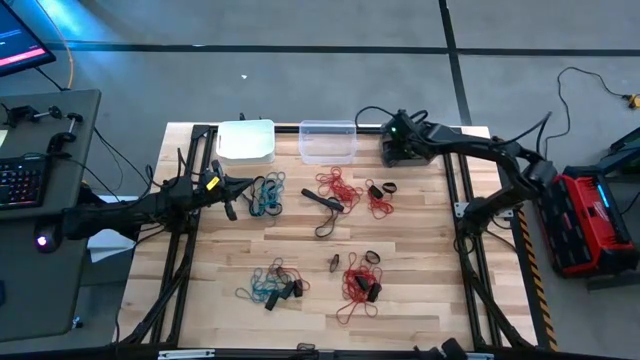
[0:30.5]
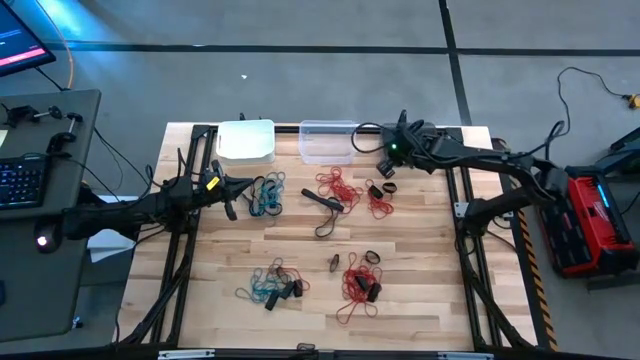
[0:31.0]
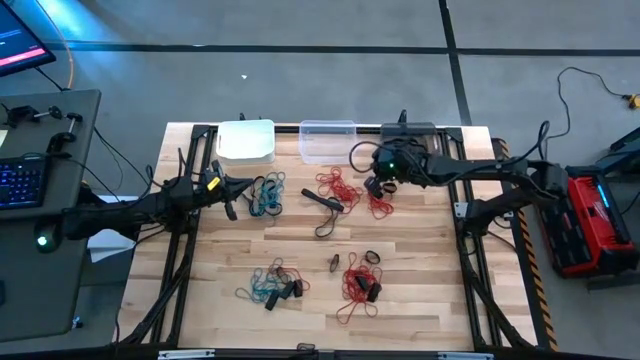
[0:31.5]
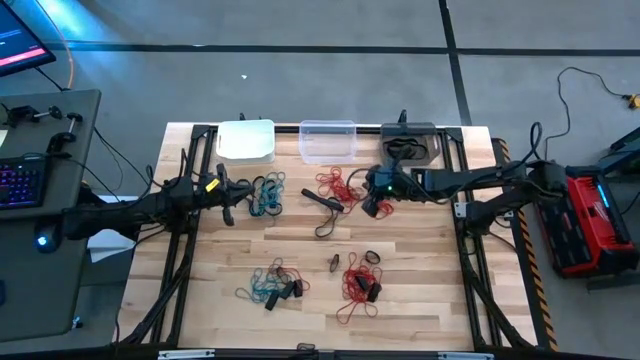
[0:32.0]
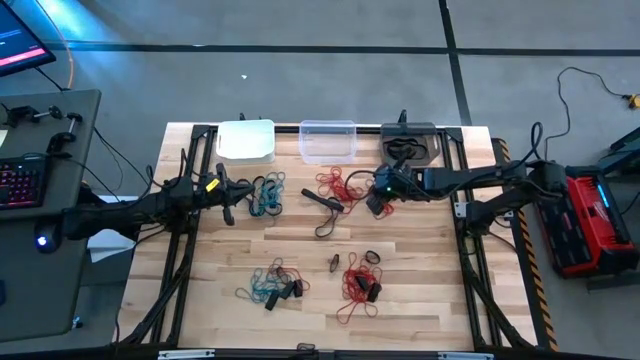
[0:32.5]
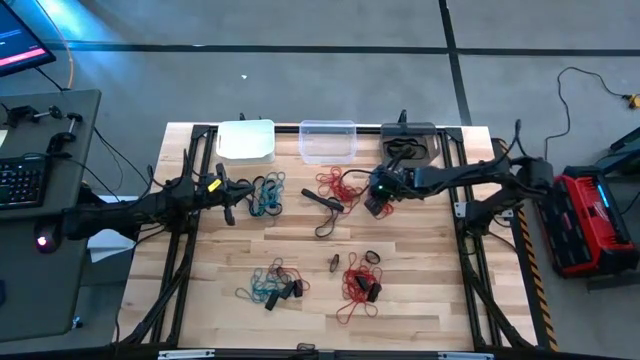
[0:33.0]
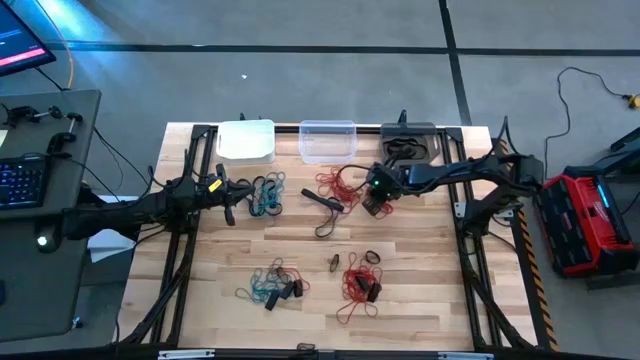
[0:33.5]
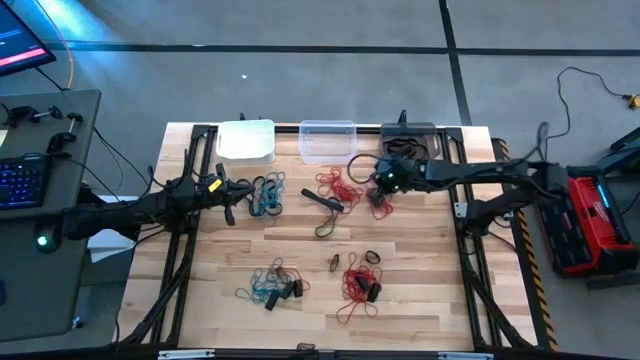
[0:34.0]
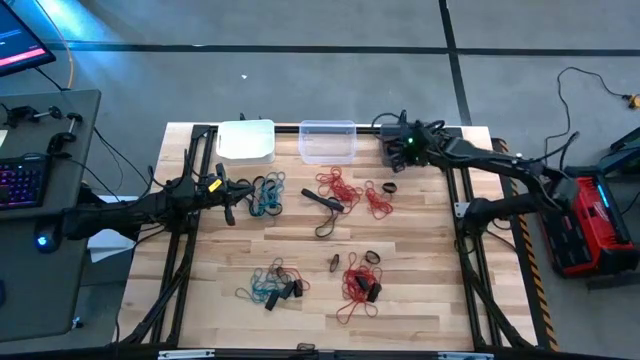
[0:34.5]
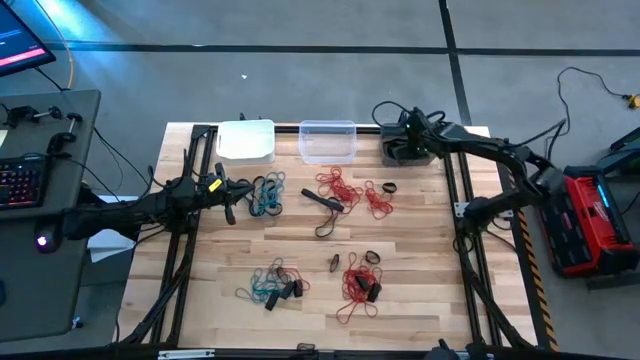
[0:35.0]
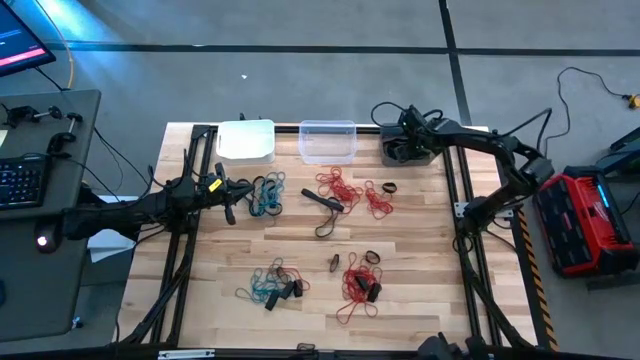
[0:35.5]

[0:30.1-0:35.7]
Task: Sort rubber bands into baskets
Put the black rubber band into the black bin

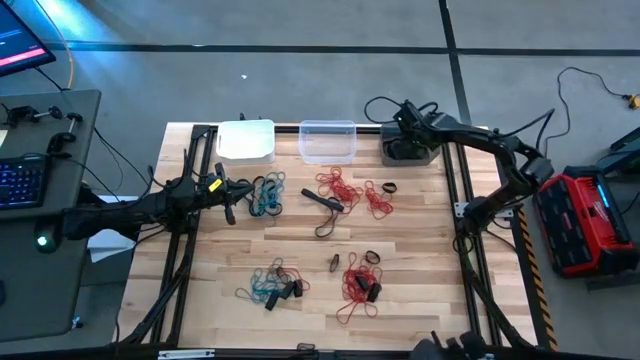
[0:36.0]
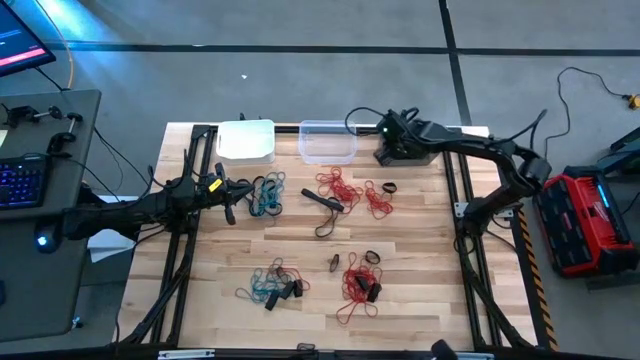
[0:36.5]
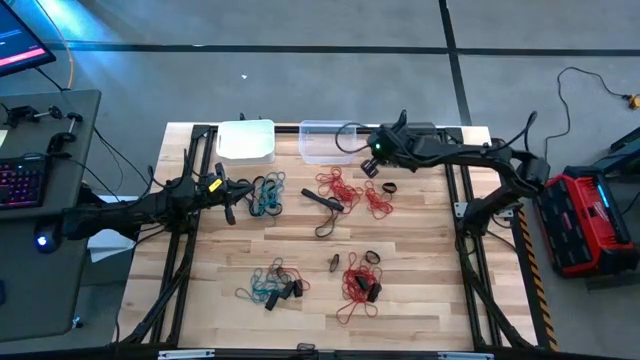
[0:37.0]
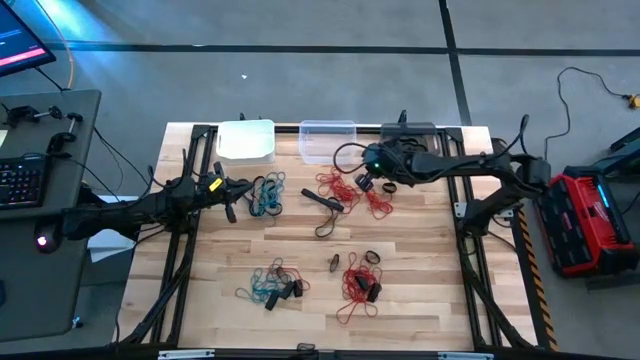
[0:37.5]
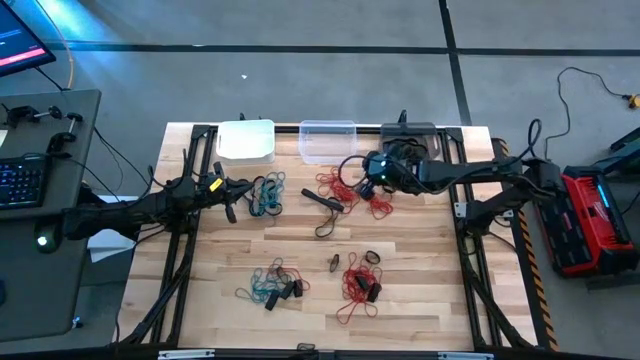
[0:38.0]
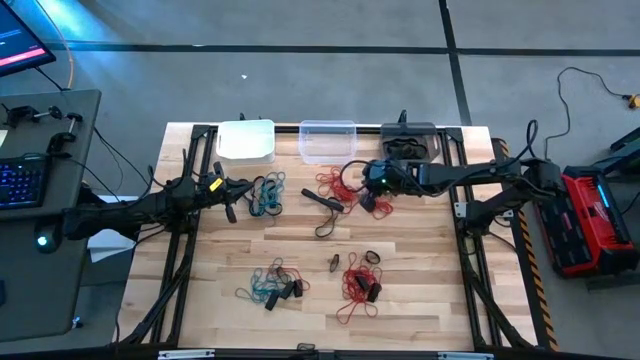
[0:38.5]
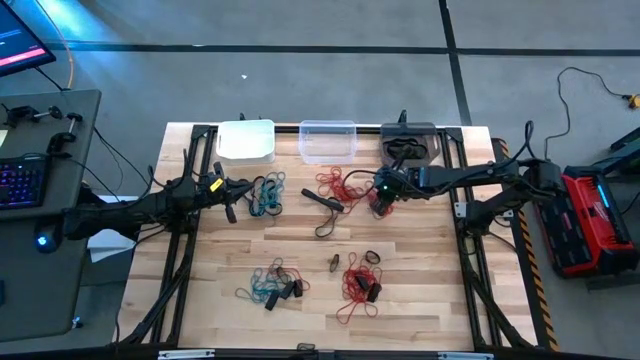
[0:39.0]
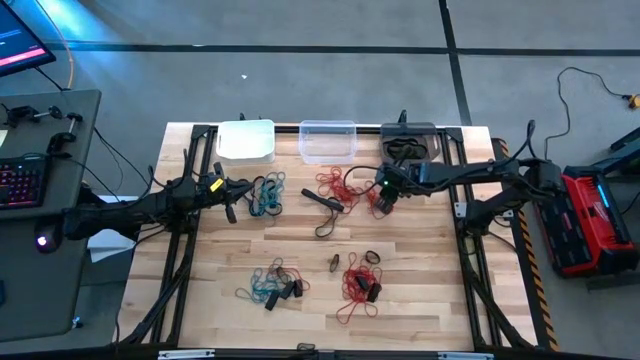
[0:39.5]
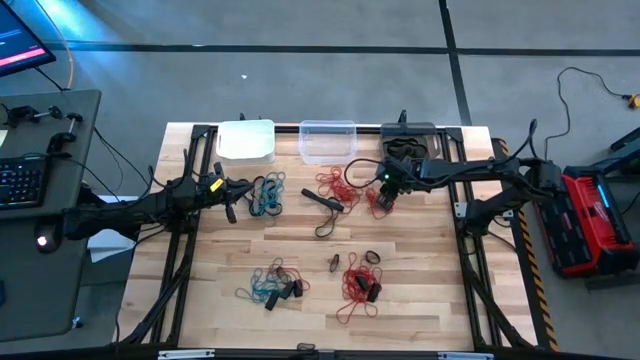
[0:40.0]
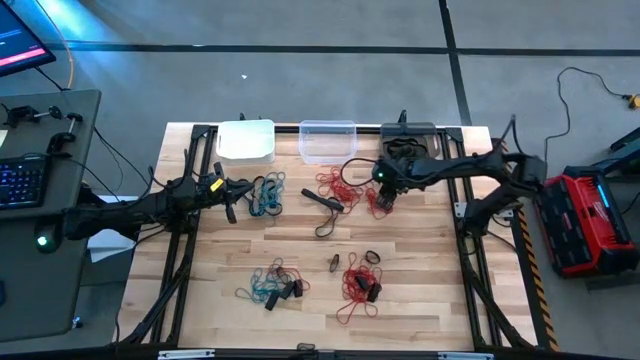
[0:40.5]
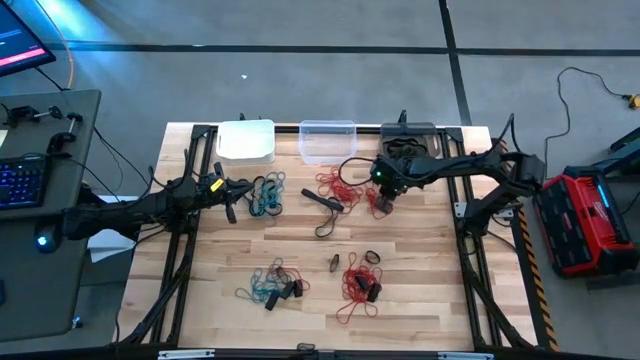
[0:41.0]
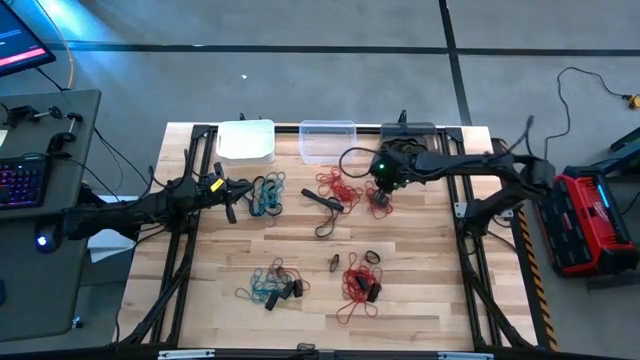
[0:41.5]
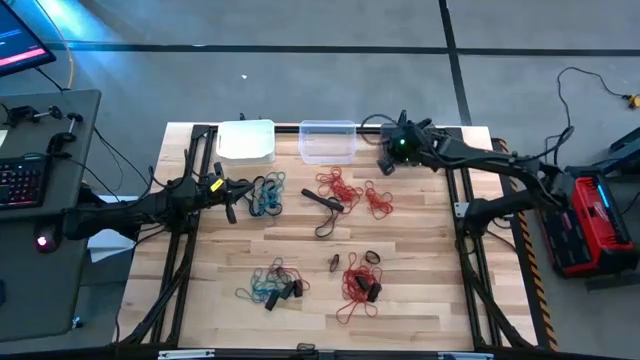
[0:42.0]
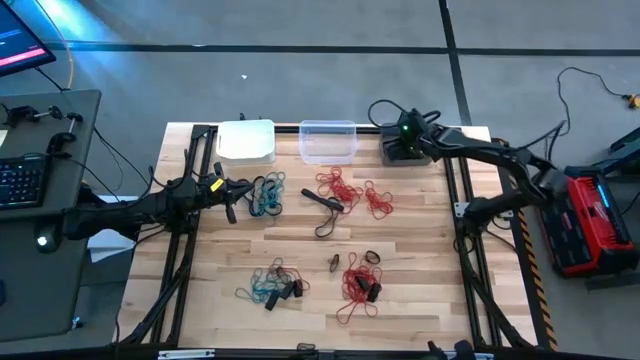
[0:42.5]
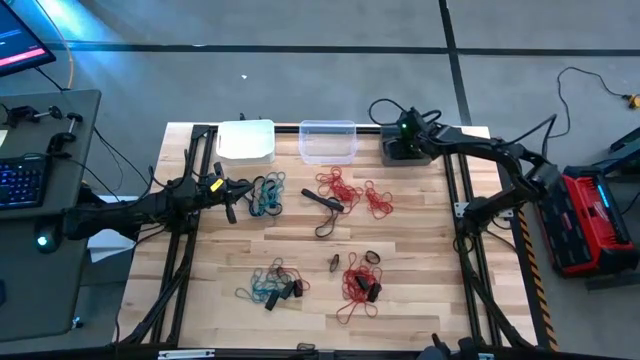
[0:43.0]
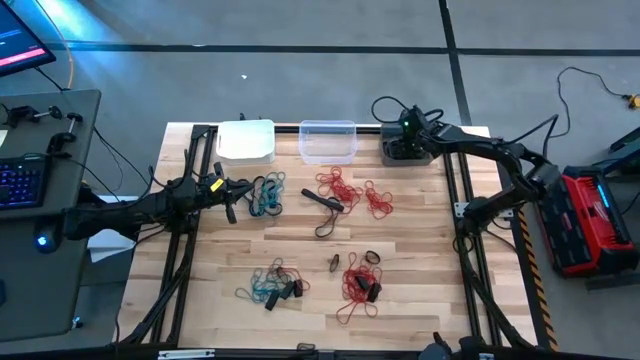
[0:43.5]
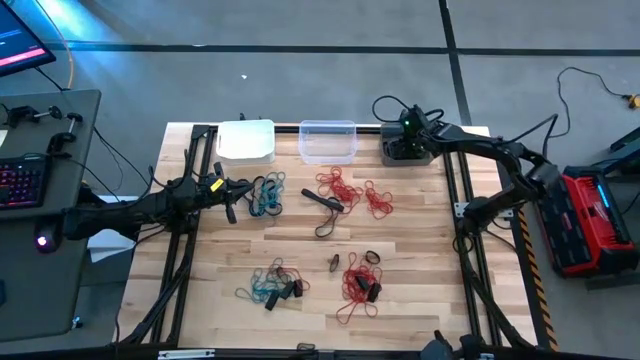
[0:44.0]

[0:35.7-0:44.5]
Put the black rubber band into the black bin

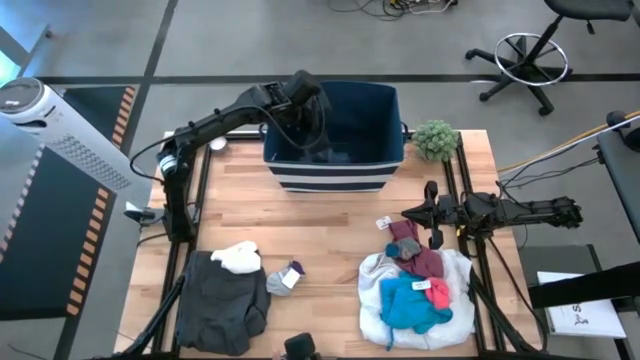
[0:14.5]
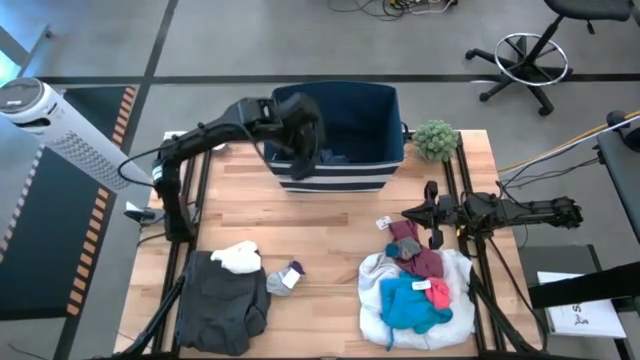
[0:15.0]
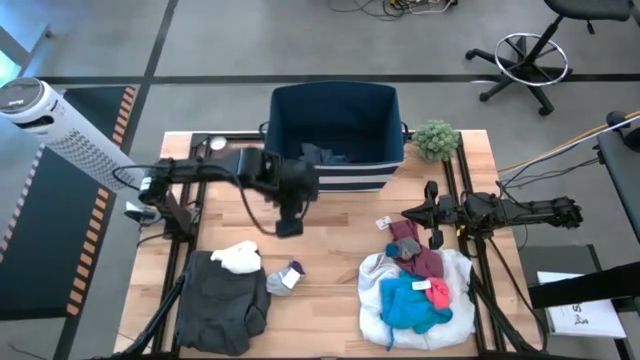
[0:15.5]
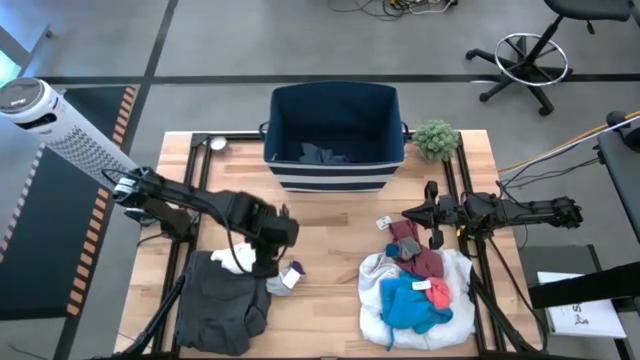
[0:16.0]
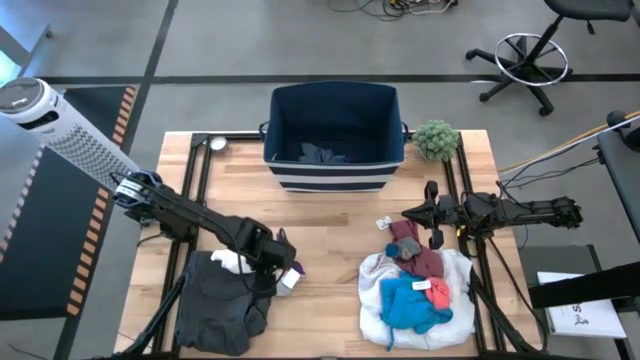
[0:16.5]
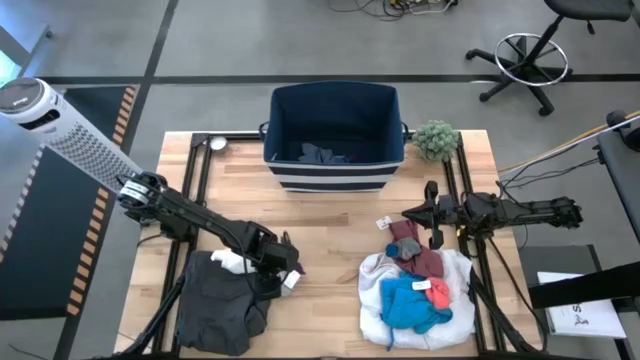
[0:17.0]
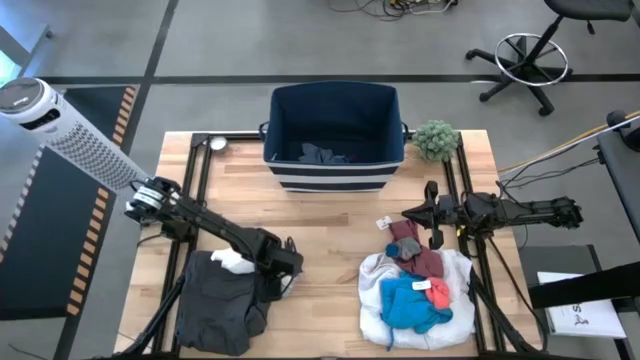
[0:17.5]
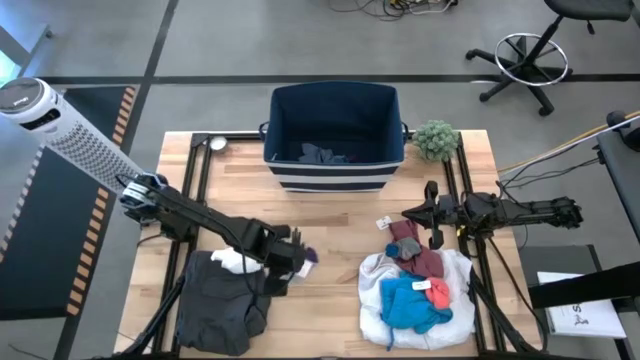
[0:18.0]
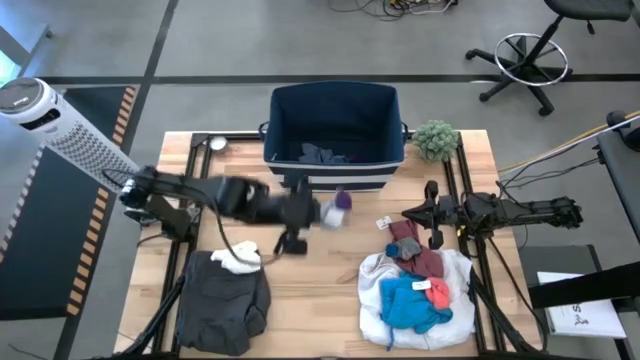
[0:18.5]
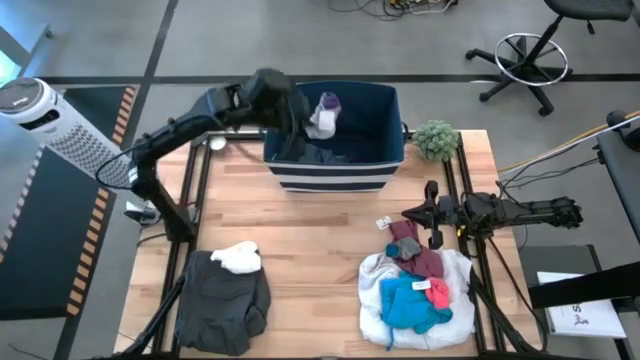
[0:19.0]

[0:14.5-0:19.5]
Task: Sort clothes
Put the gray and purple socks into the laundry organizer

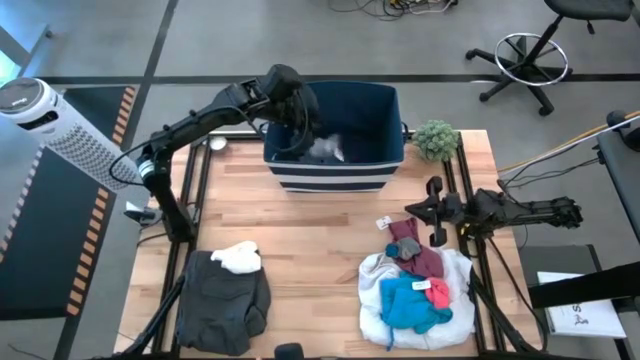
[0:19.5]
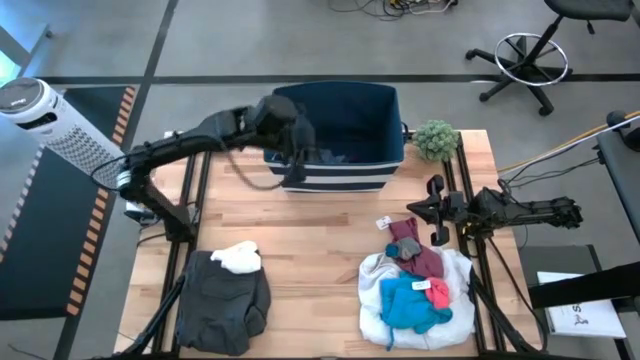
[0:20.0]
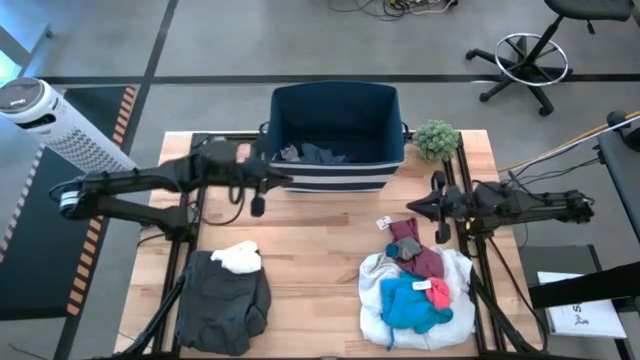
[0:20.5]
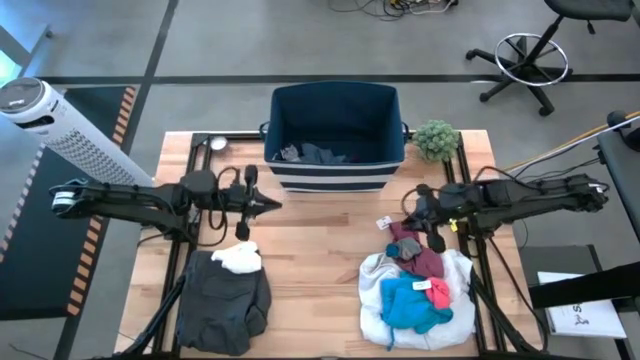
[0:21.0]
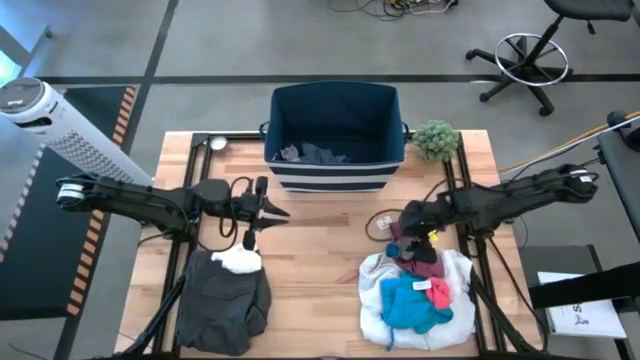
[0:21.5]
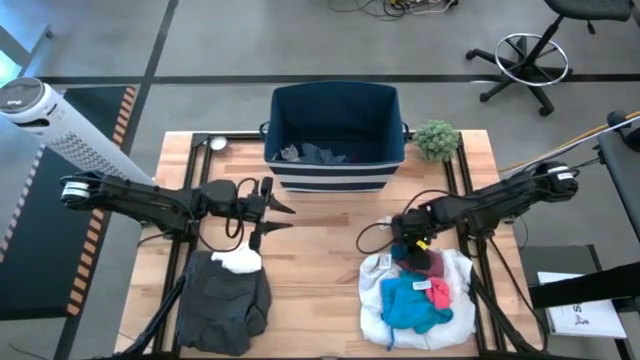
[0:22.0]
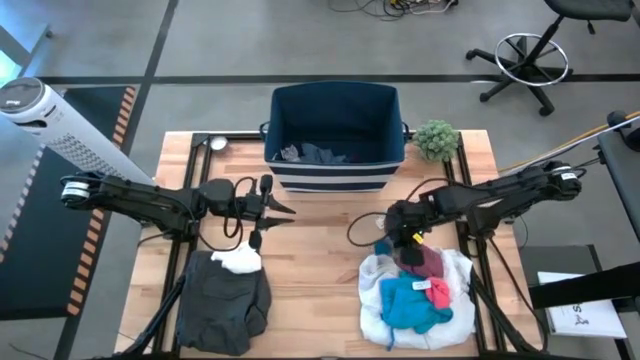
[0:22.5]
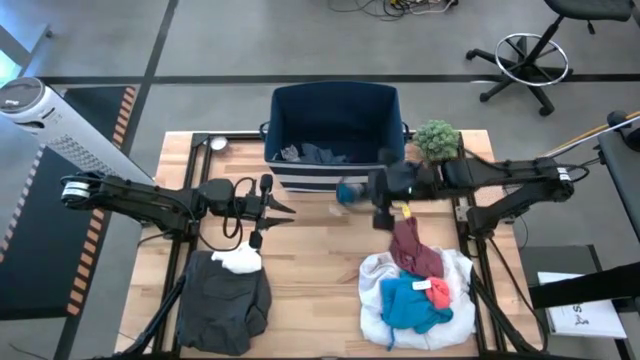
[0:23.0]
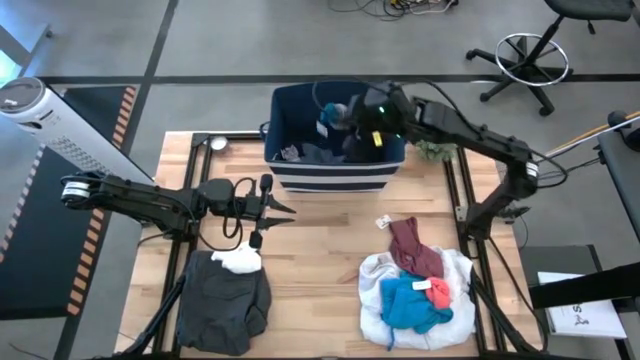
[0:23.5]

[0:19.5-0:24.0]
Put the gray and blue socks into the laundry organizer
